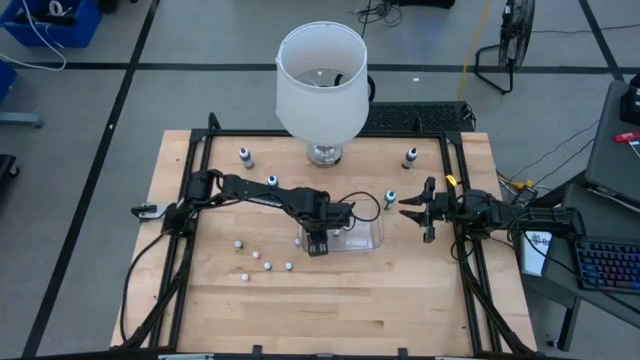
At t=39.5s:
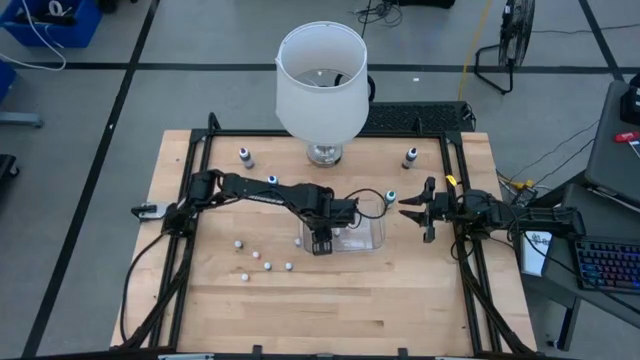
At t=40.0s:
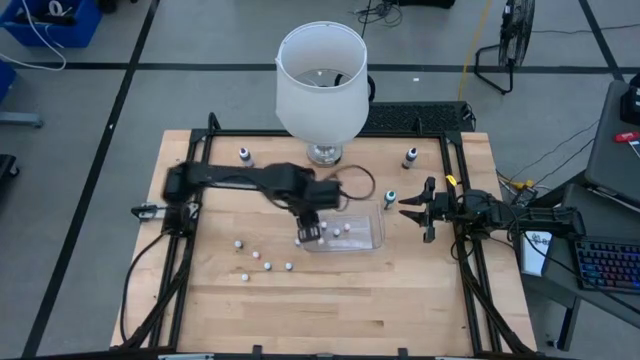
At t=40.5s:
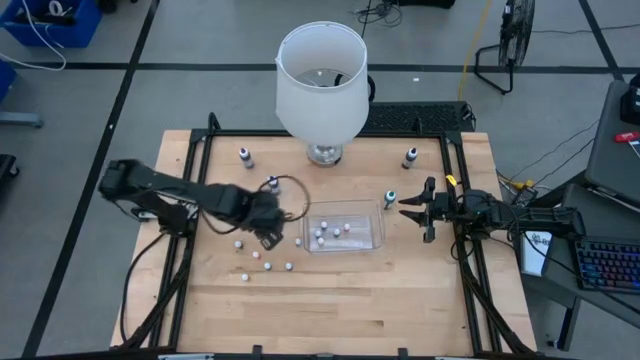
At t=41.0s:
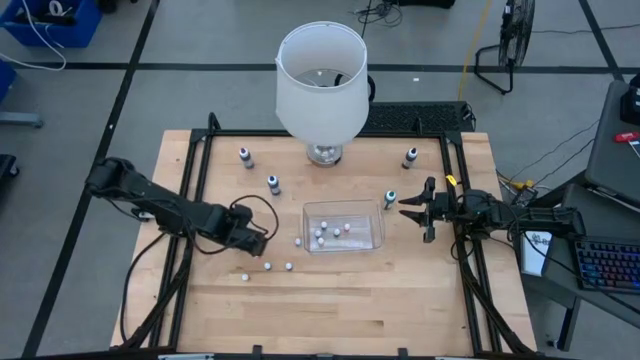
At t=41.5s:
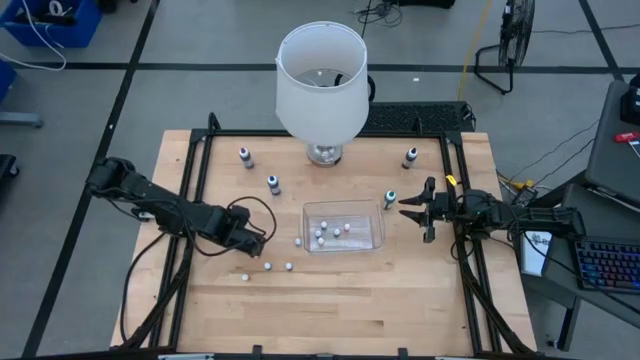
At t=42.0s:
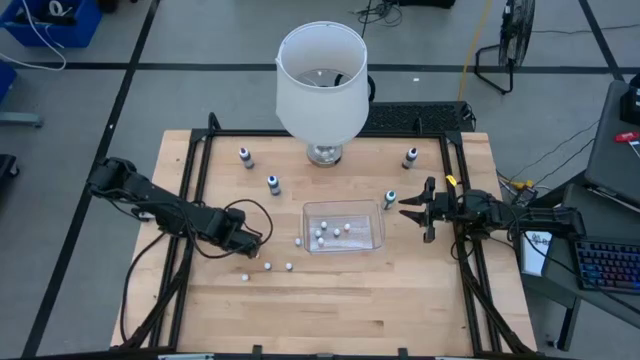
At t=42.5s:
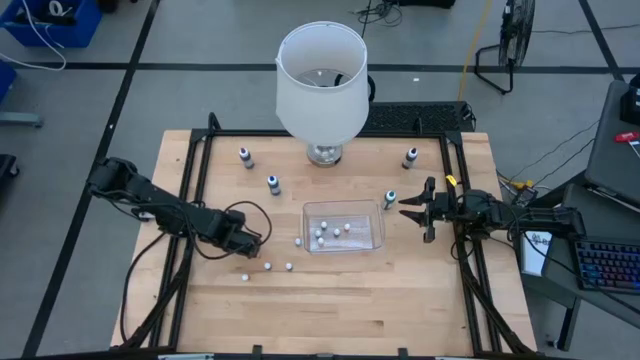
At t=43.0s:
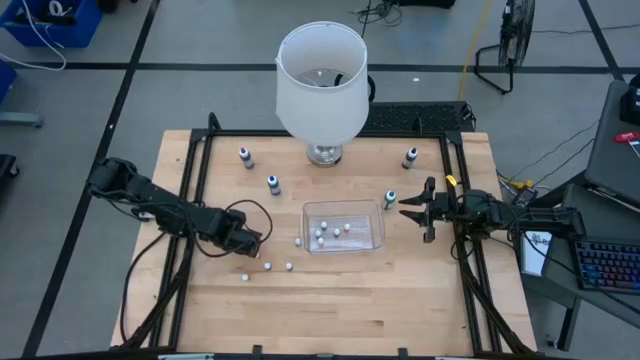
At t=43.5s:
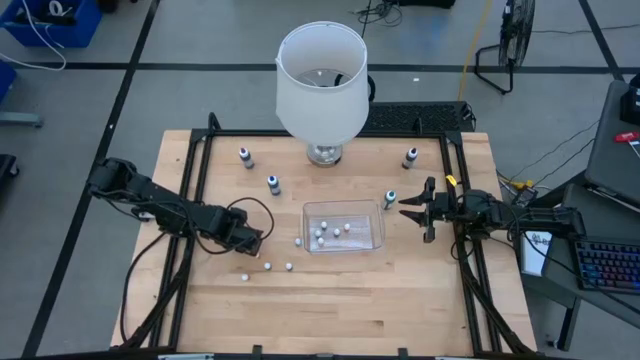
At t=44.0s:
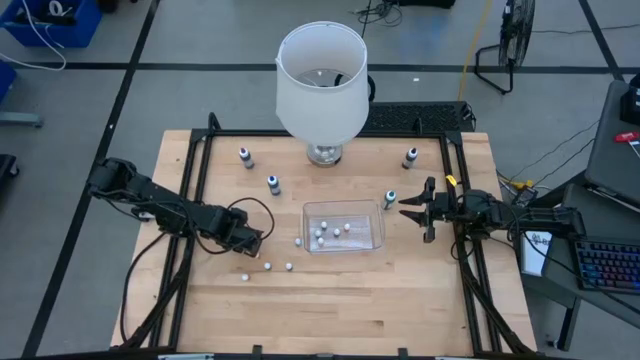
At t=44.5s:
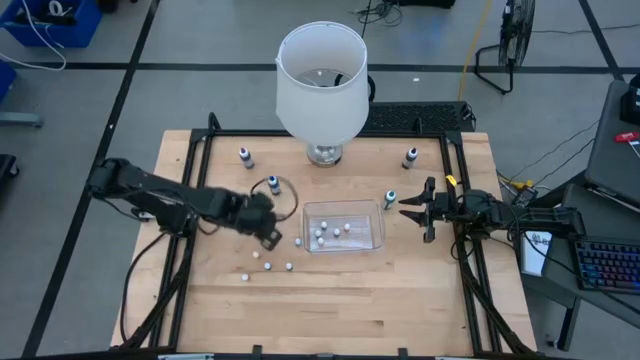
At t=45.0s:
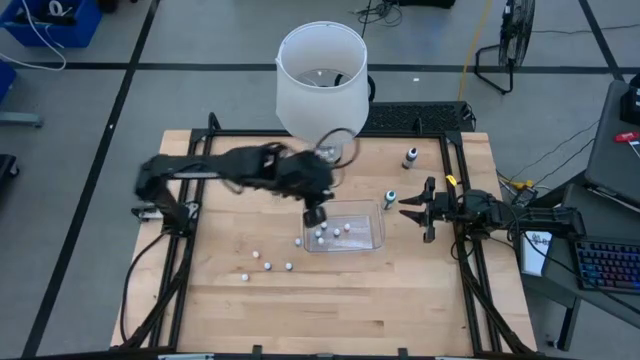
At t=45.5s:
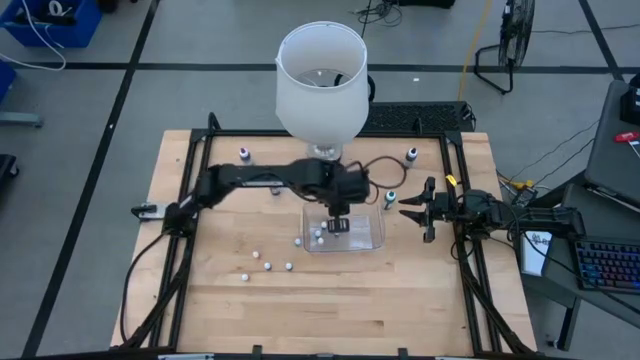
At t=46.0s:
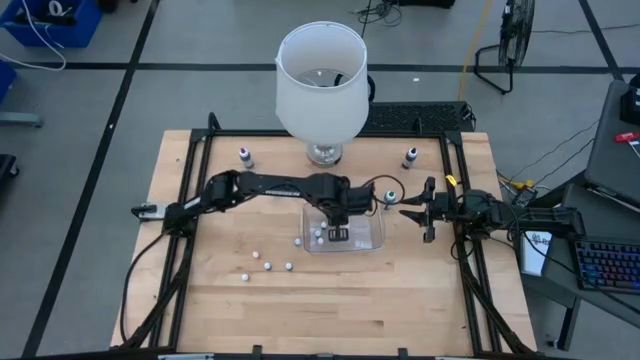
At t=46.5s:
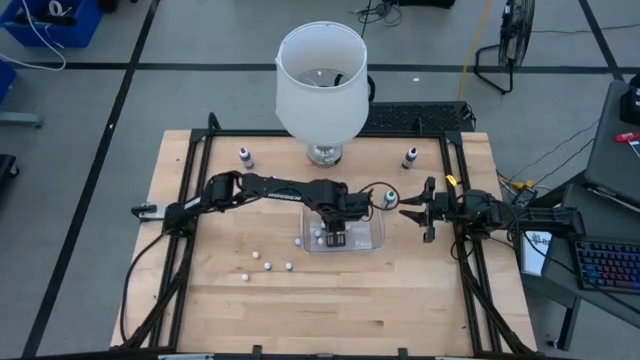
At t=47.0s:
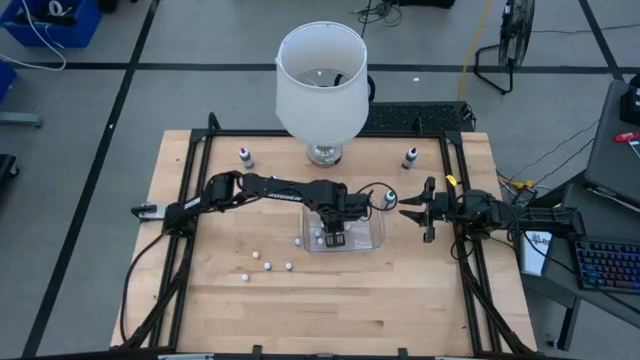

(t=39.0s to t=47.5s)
Task: Pick & Place food coloring
Put the small purple food coloring bottle into the transparent bin

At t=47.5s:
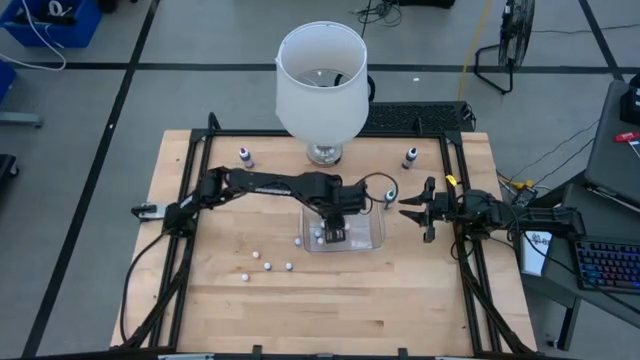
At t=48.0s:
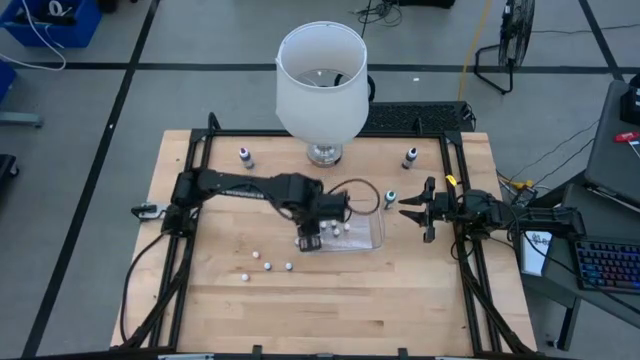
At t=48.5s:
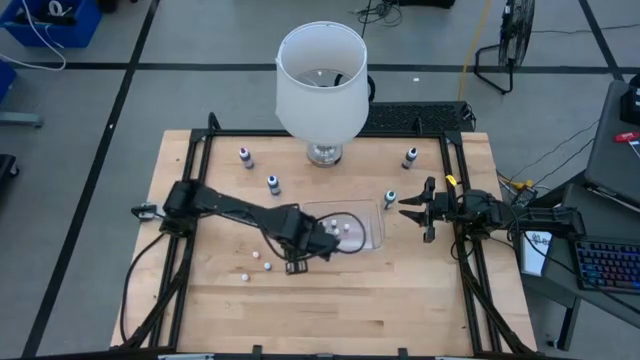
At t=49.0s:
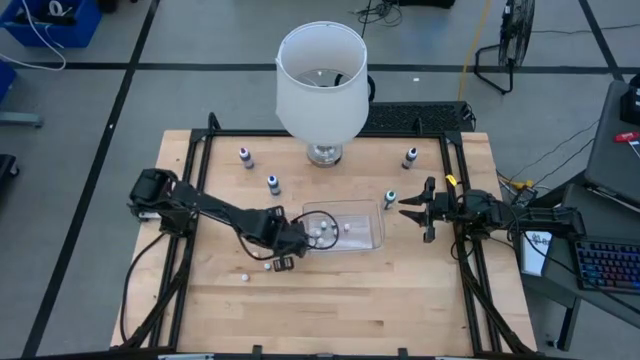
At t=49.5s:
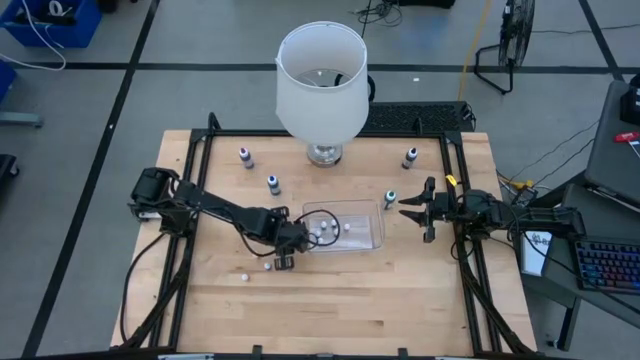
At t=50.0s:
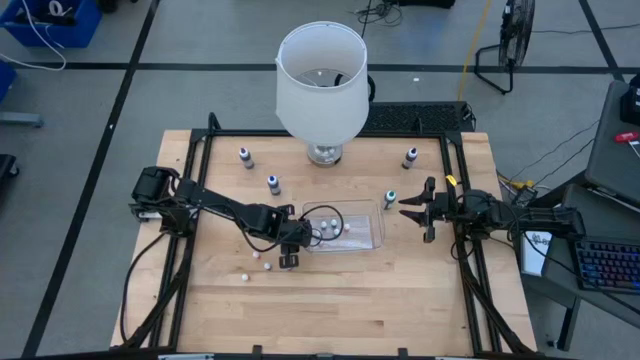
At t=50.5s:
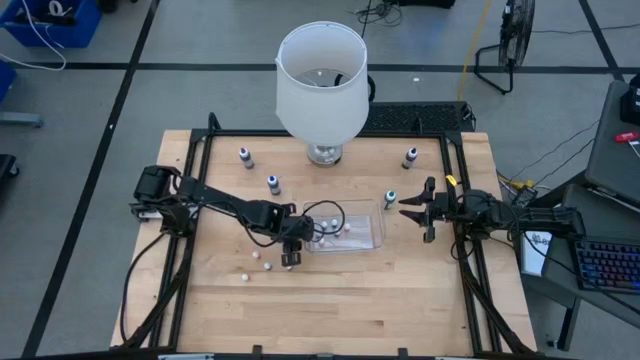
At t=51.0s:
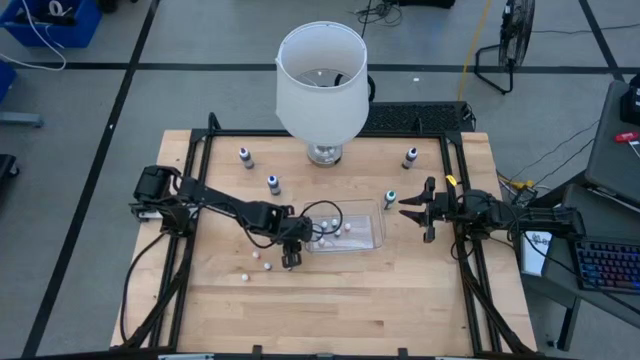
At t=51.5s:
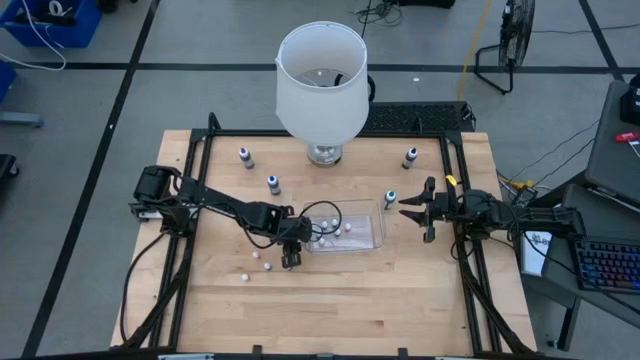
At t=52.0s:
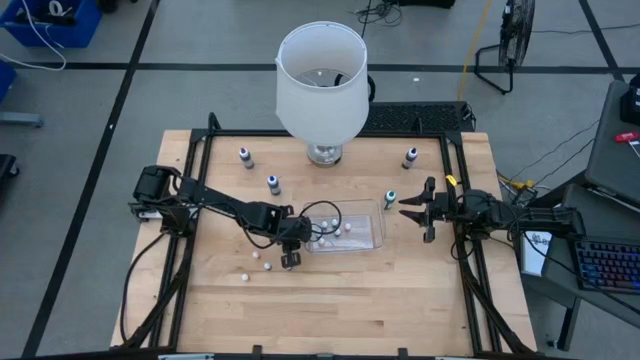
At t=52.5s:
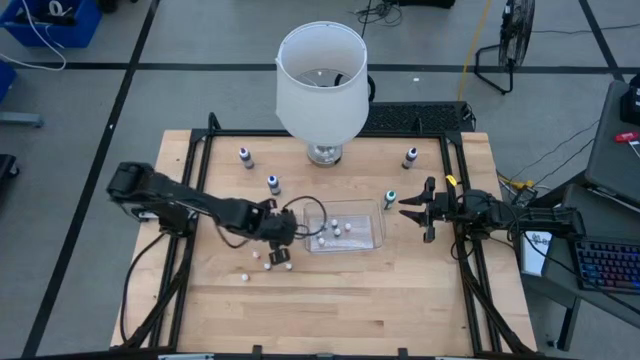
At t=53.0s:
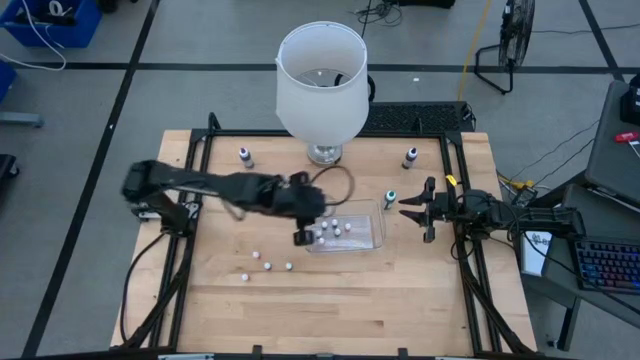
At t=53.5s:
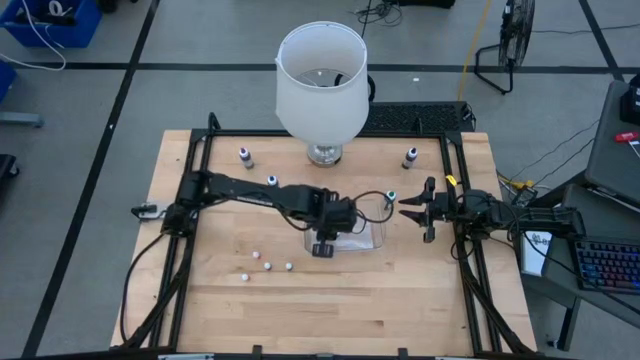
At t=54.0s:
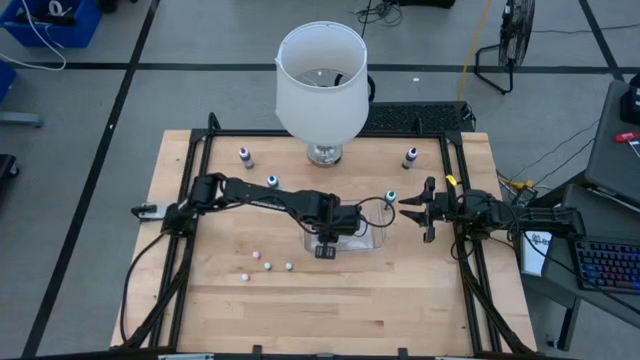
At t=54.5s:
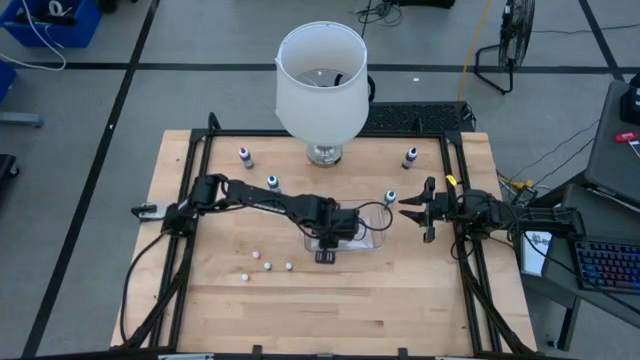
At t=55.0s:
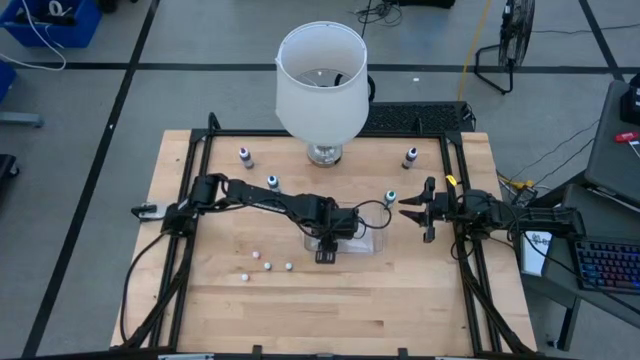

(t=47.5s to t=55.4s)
Put the small green food coloring bottle into the transparent bin

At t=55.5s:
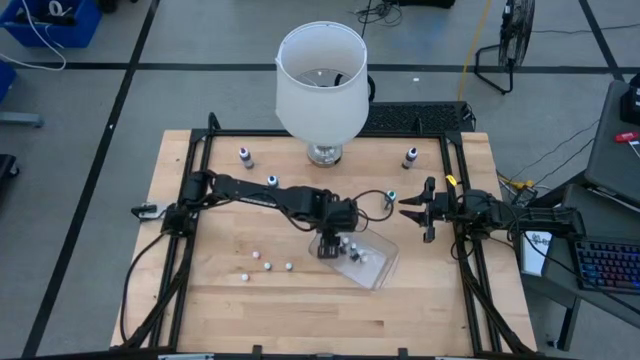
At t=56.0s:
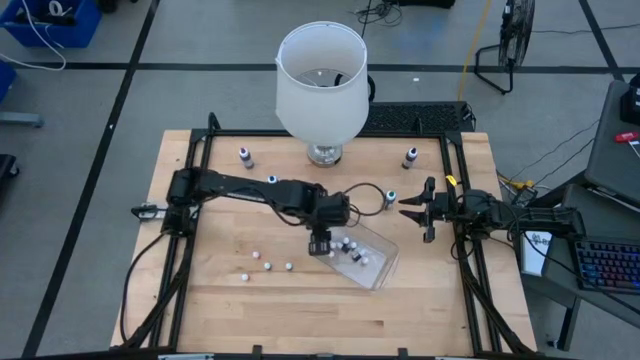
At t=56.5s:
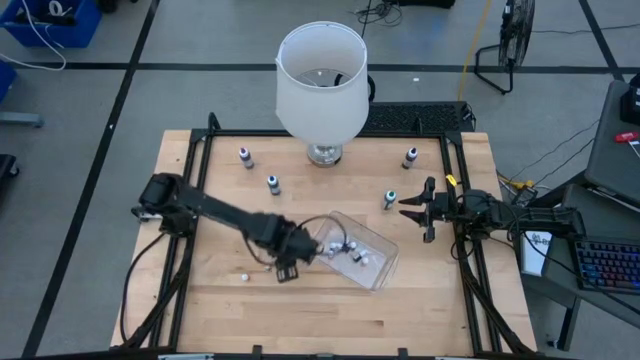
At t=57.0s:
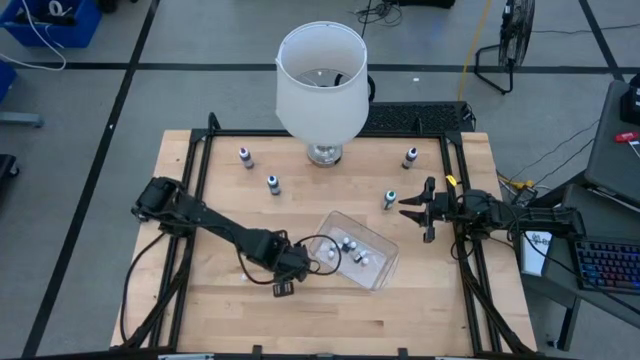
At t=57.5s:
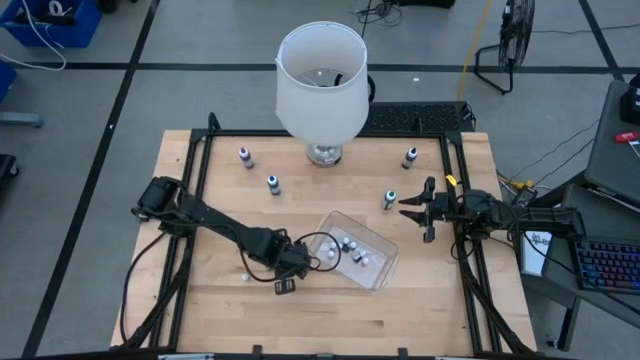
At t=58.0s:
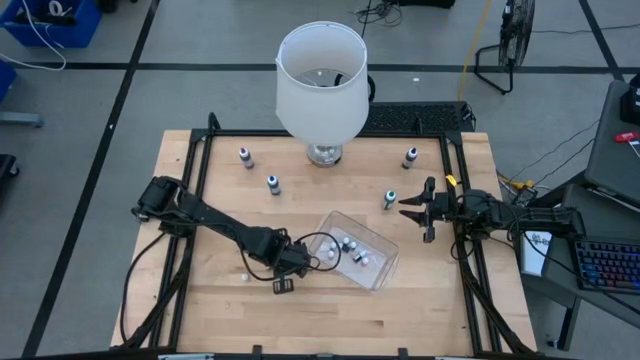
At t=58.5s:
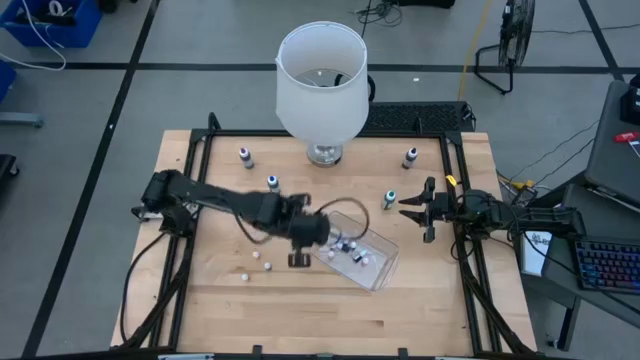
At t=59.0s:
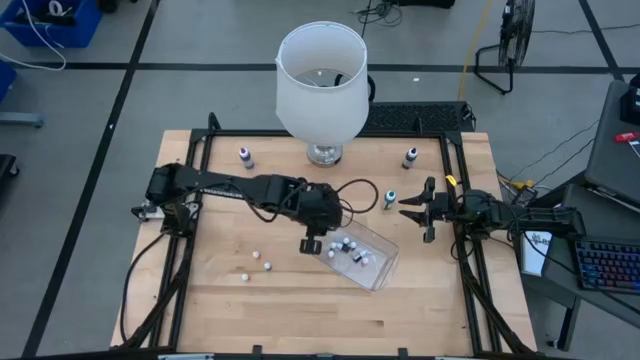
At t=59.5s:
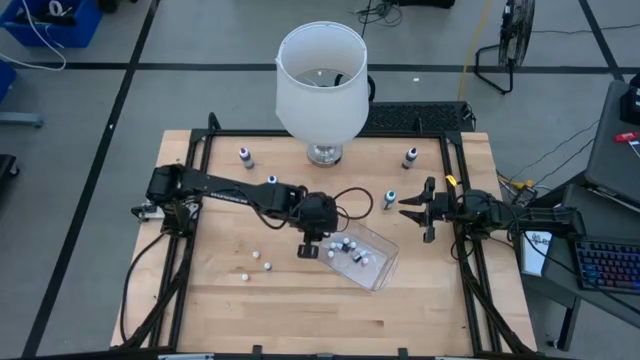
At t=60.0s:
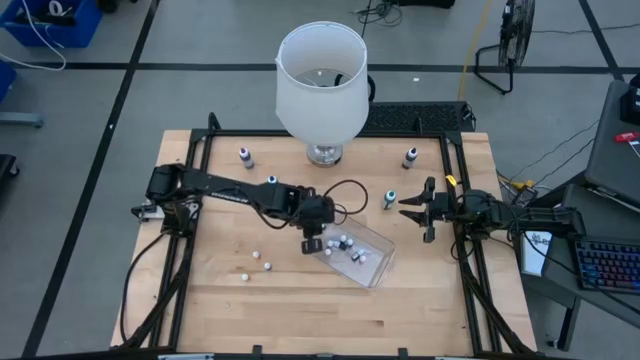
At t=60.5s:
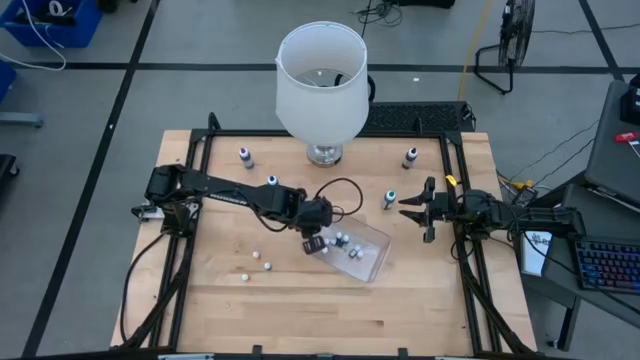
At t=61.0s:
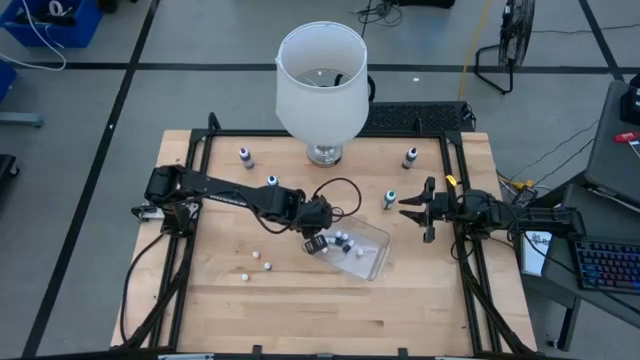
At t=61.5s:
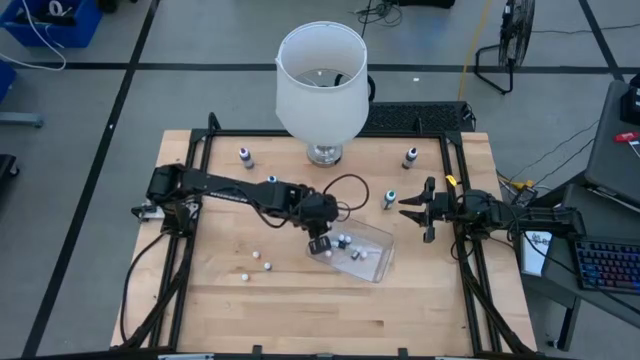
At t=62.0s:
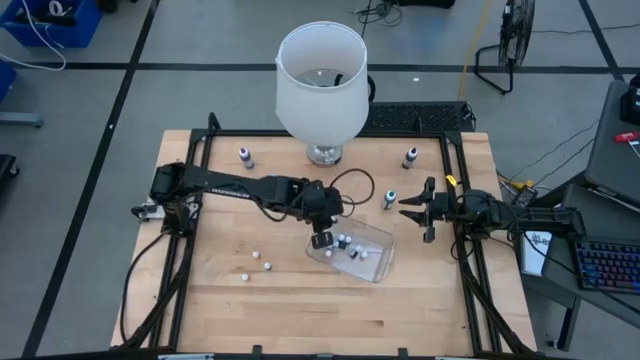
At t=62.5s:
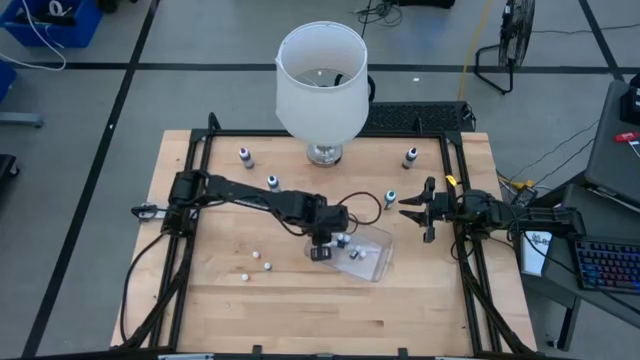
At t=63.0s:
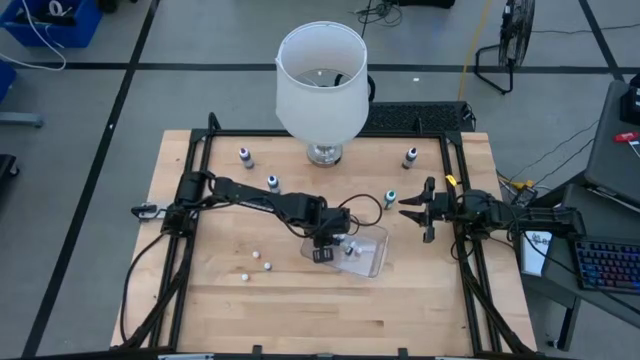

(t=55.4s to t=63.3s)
Put the small purple food coloring bottle into the transparent bin
